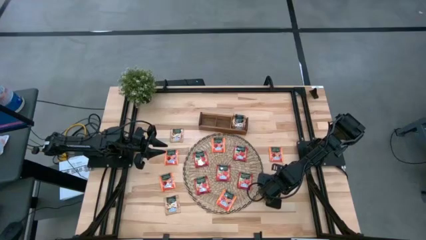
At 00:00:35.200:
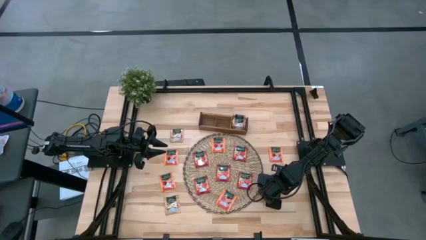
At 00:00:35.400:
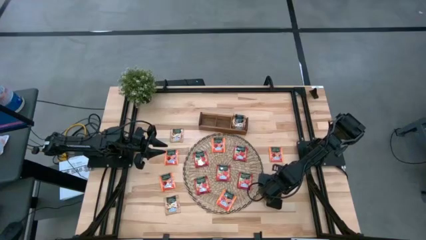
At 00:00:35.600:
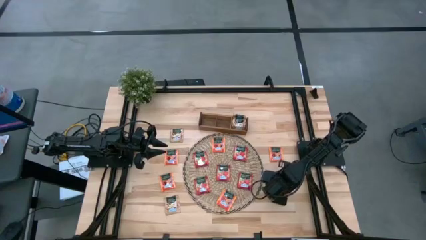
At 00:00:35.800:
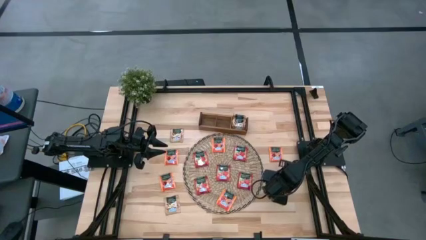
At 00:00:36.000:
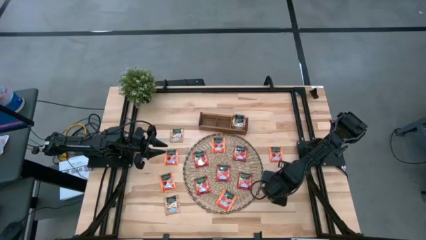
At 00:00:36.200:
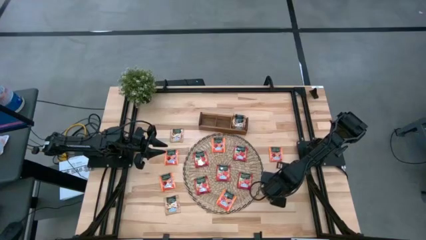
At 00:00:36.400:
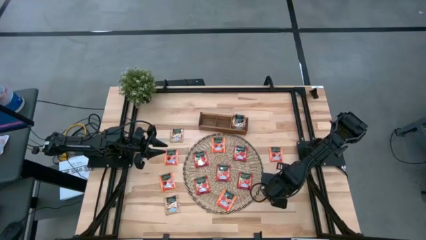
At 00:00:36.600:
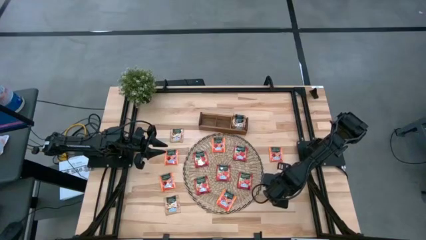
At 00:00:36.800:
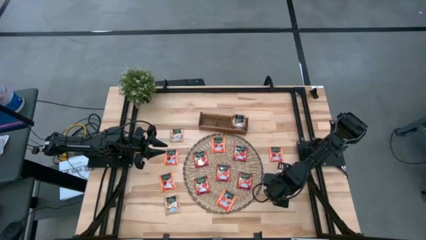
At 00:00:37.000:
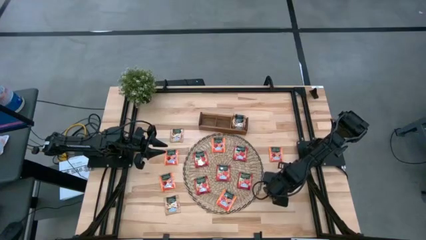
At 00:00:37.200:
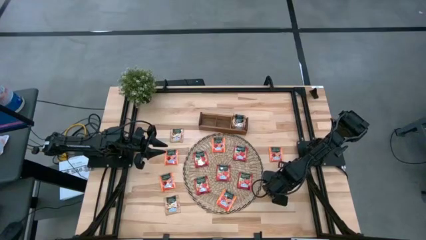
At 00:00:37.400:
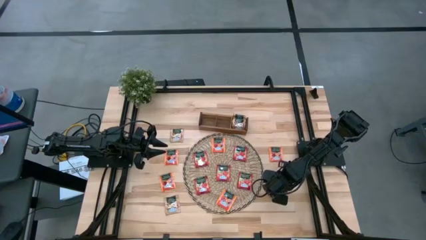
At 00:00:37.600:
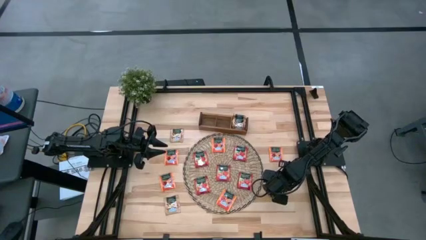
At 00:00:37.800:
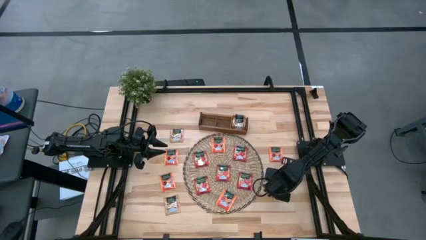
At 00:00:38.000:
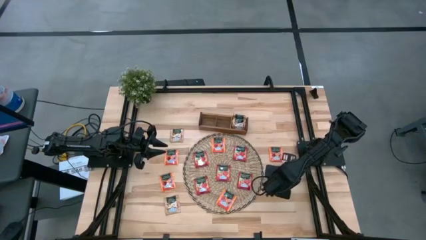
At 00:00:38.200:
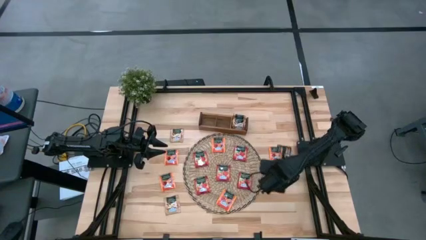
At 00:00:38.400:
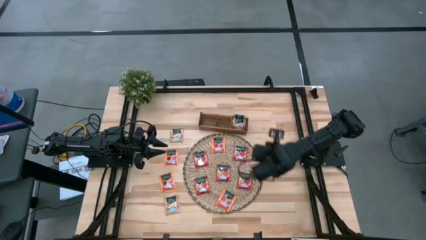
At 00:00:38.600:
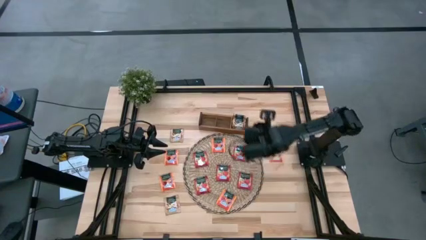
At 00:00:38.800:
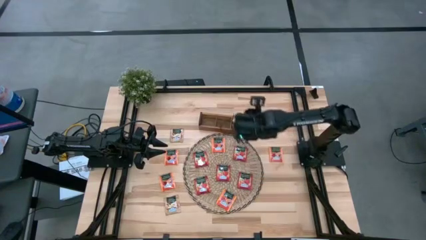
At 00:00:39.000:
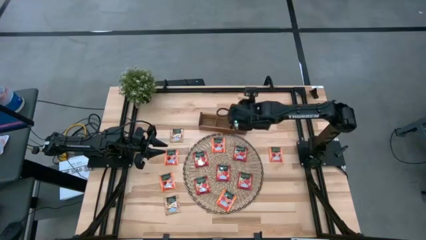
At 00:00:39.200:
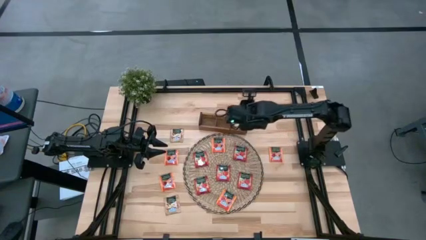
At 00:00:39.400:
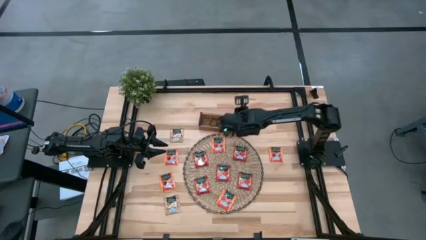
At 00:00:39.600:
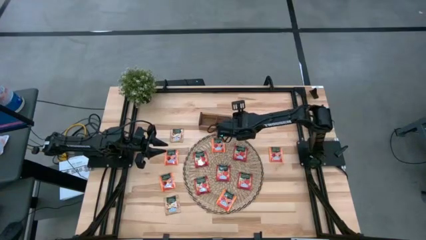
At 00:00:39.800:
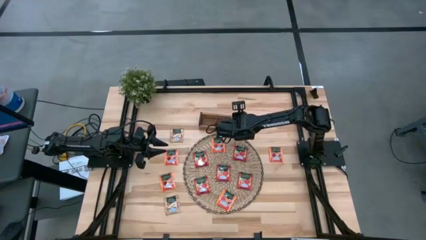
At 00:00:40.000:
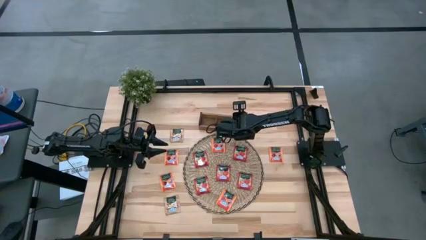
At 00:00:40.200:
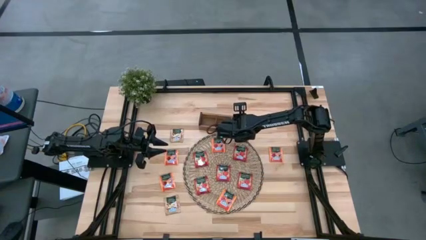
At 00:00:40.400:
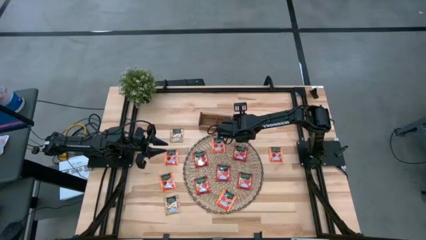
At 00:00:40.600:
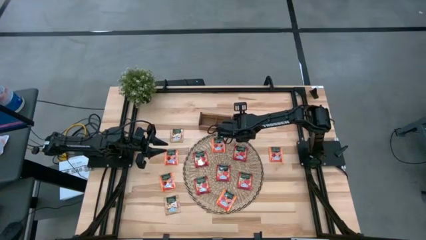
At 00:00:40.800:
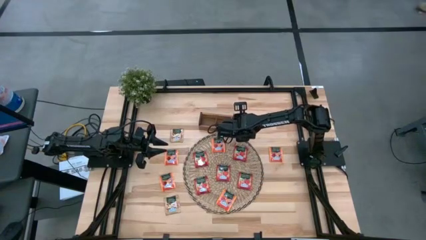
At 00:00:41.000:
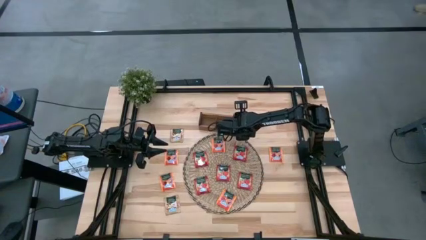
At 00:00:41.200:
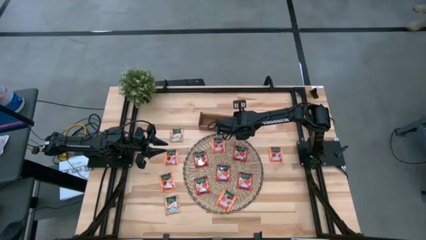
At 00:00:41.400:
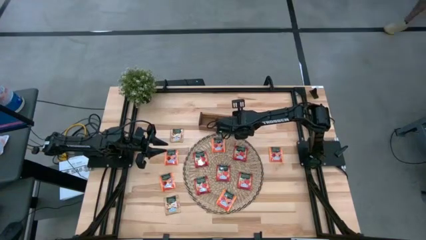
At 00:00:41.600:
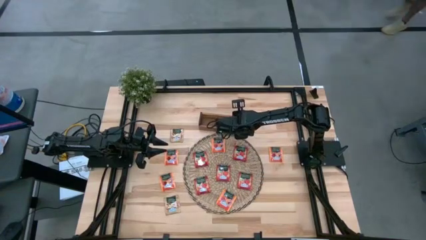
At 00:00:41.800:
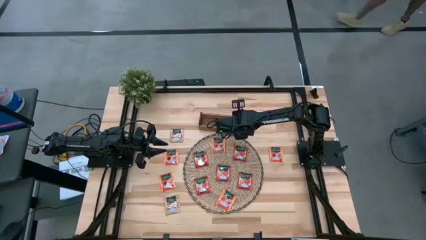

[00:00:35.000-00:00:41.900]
Task: Pick & Place Tea
Put the brown tea bag into the right section of the wooden organizer

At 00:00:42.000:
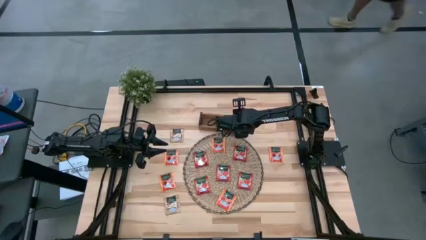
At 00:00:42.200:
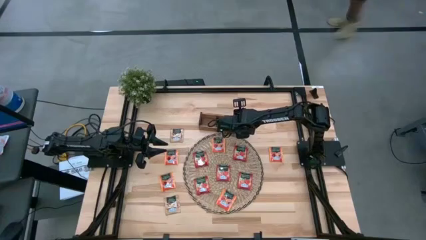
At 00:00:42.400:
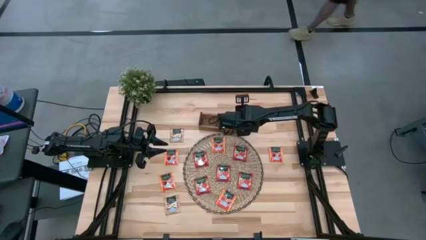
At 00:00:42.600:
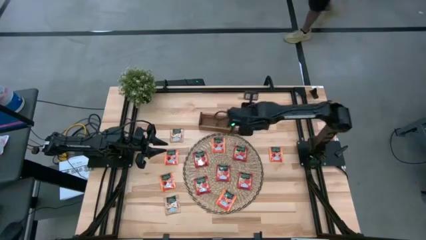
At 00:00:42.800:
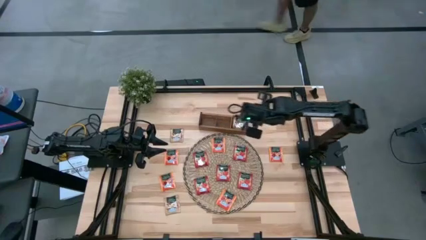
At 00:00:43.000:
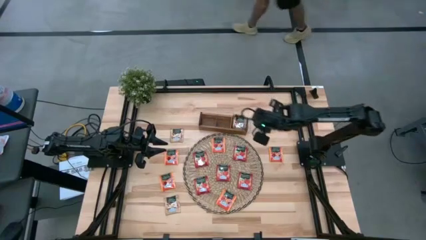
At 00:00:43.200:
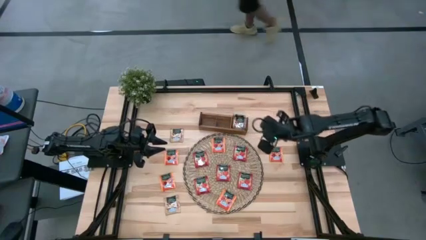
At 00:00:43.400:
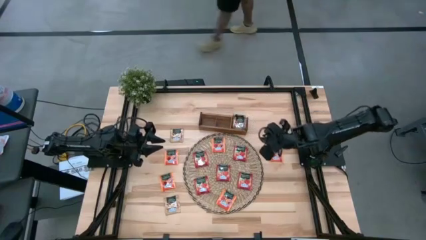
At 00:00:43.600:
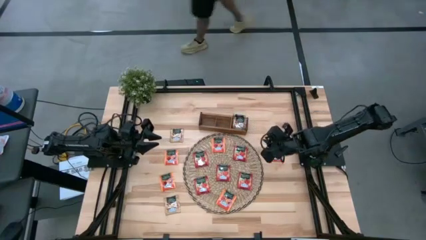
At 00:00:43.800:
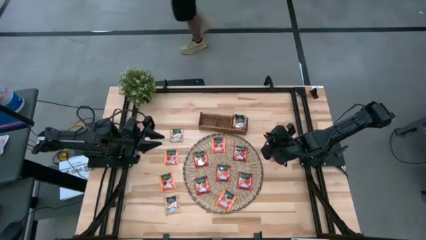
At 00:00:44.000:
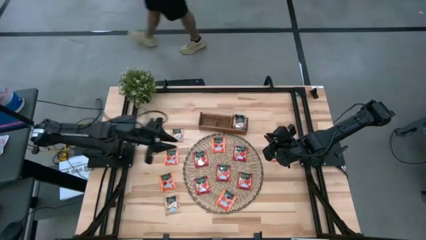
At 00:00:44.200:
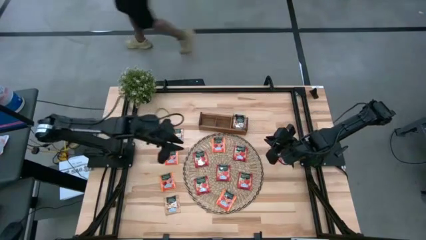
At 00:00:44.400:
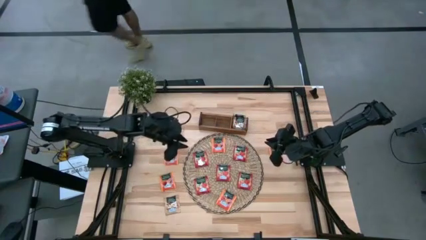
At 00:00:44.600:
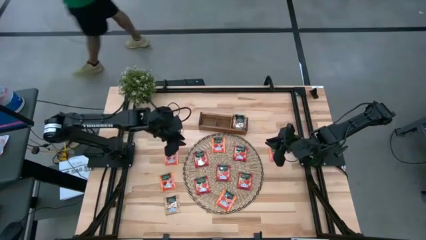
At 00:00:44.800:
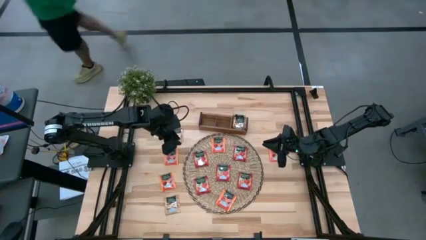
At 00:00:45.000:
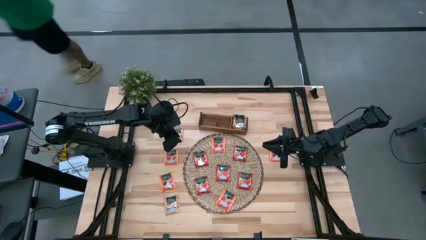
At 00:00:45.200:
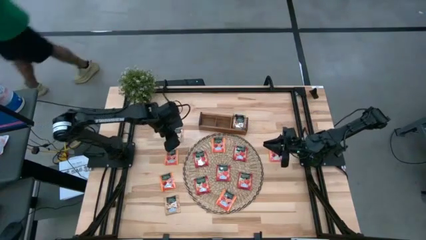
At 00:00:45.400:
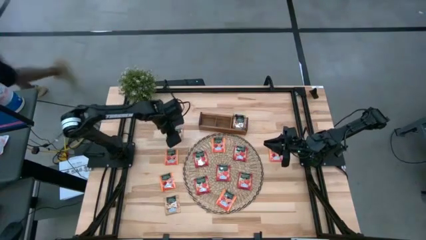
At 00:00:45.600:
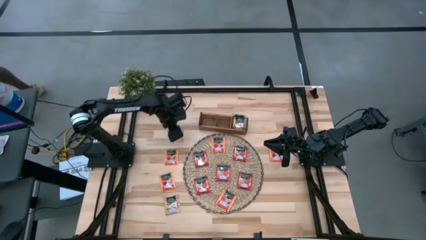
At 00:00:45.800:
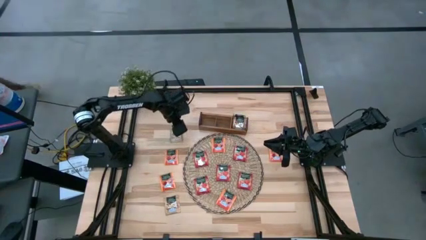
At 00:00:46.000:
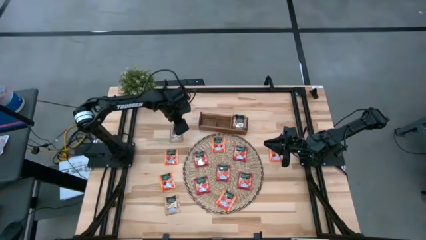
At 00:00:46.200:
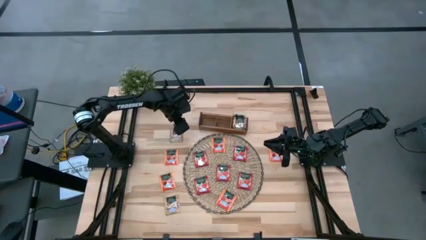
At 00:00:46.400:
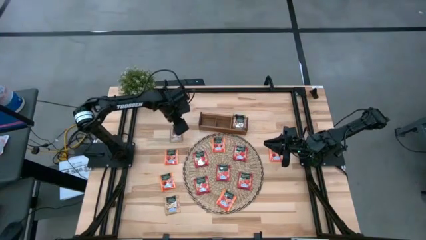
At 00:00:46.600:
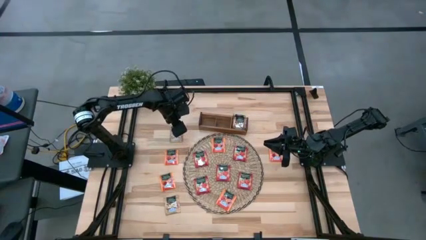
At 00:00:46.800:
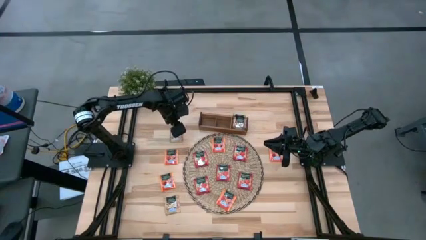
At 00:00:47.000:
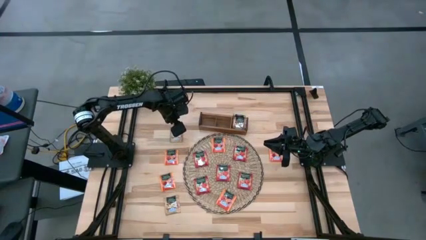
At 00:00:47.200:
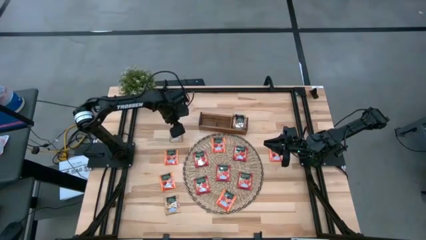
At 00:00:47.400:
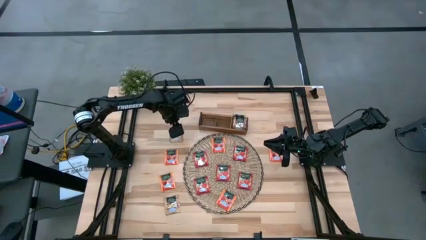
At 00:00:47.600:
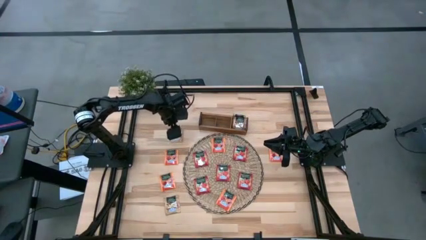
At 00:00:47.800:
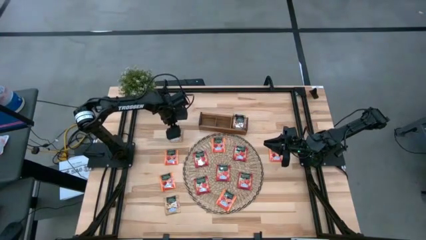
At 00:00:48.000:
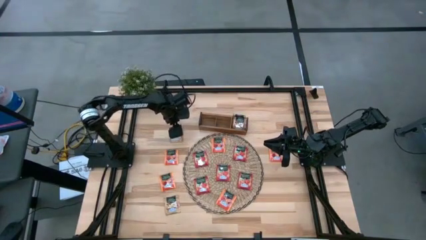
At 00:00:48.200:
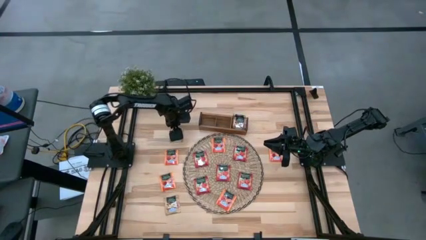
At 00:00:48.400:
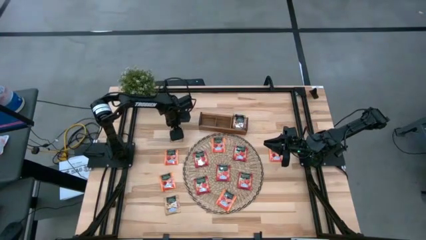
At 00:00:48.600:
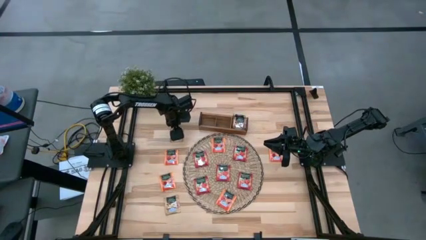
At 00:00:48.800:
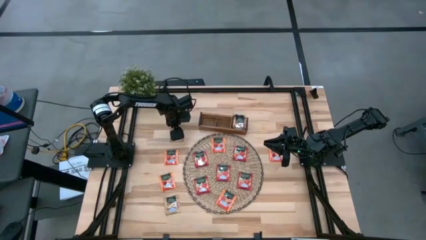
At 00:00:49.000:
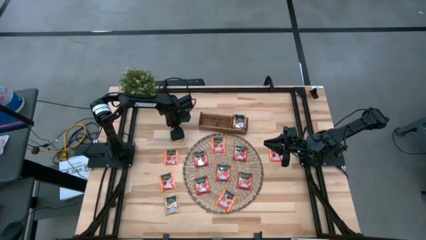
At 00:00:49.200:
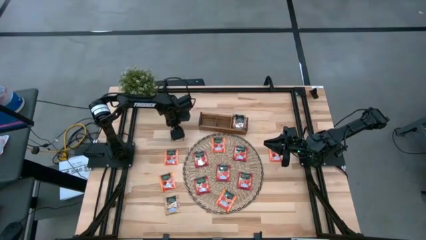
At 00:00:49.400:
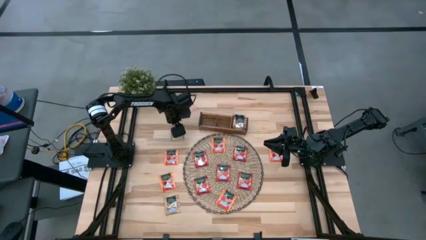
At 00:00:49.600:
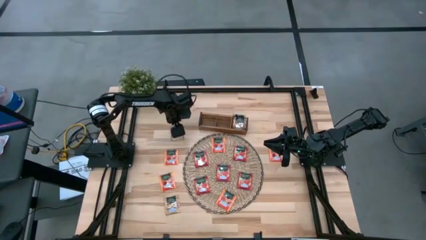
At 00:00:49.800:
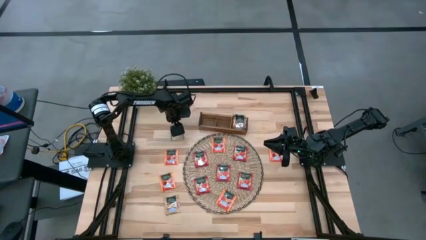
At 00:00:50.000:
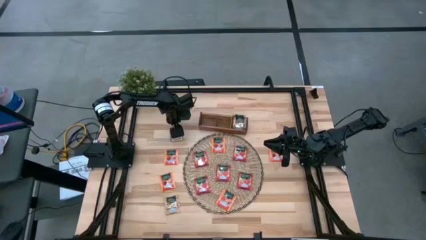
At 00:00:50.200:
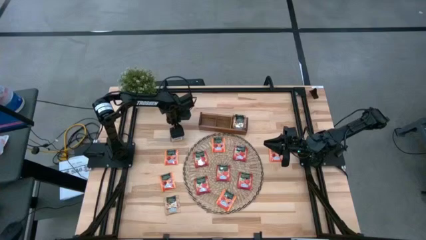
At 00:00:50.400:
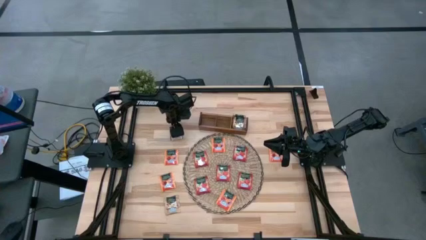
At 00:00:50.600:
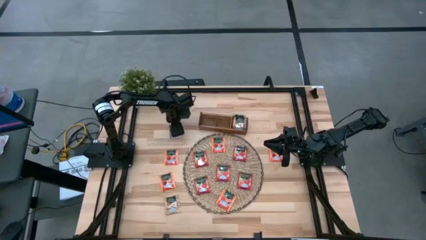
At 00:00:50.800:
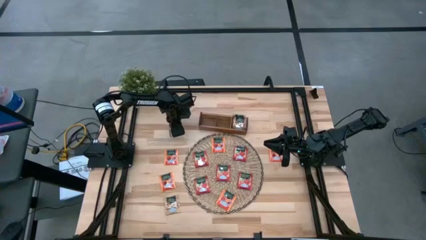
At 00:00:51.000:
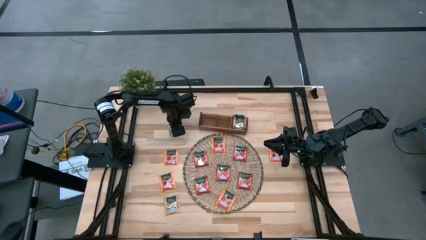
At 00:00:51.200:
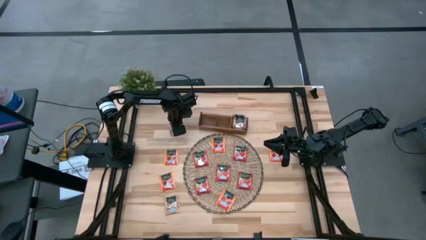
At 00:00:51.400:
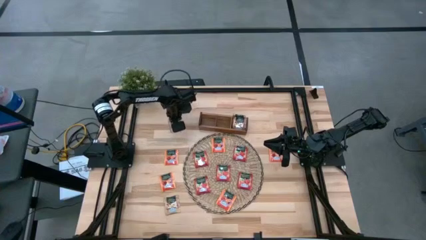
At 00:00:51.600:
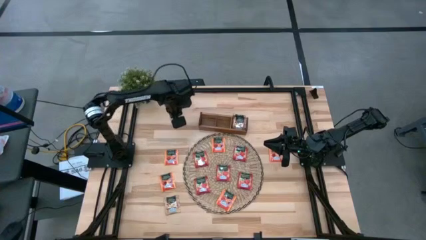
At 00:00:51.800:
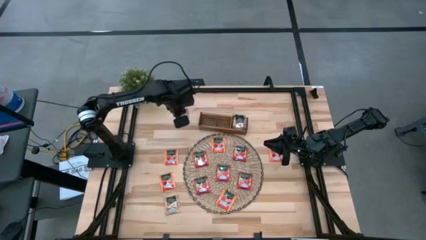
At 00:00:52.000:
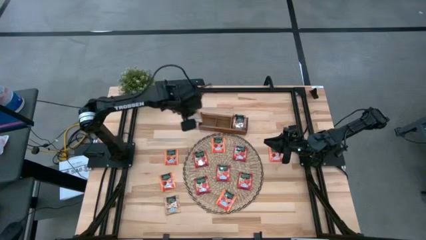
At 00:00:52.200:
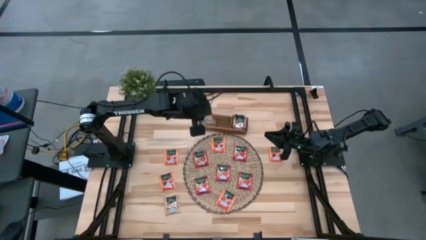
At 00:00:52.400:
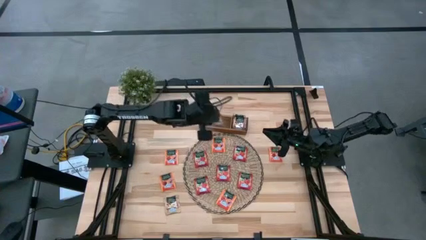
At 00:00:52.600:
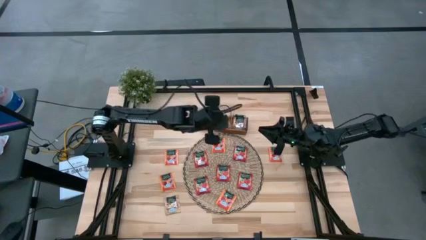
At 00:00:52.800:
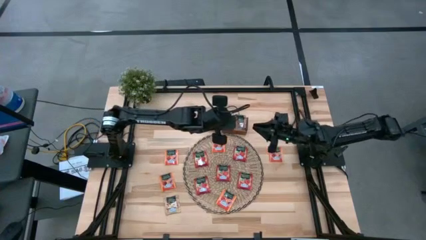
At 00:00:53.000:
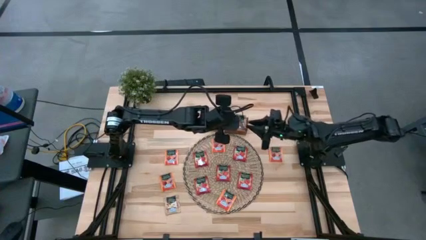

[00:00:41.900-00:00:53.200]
Put the brown tea bag into the right section of the wooden organizer
